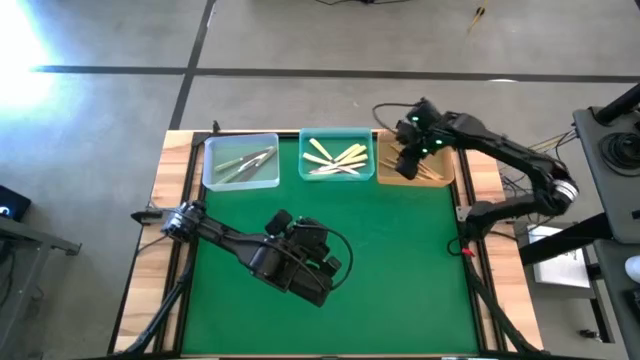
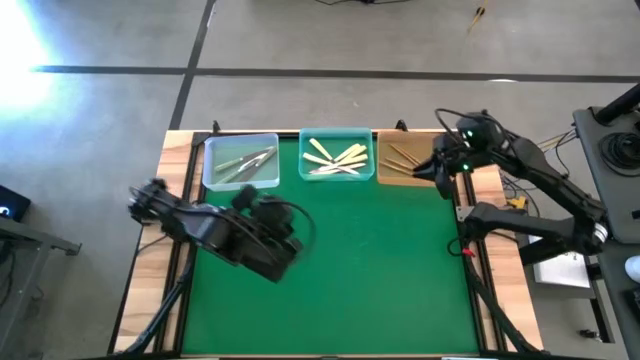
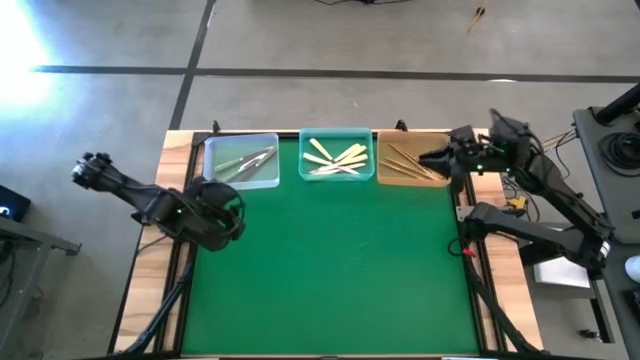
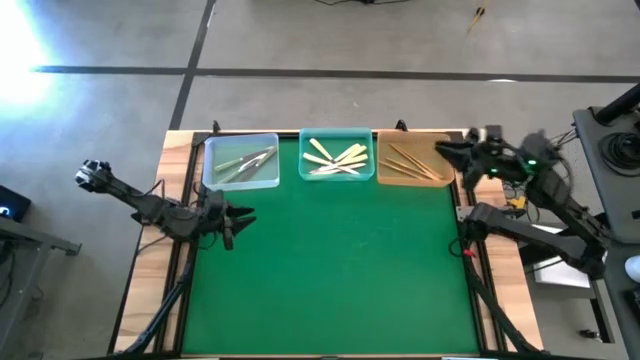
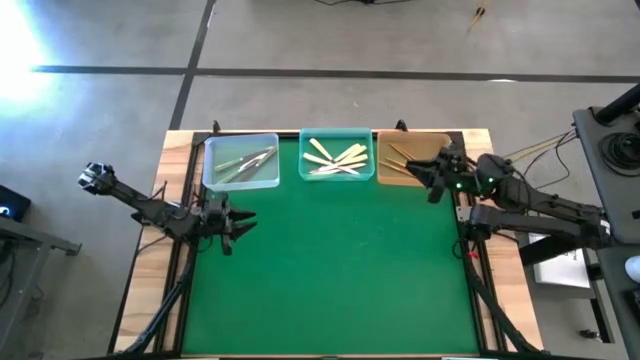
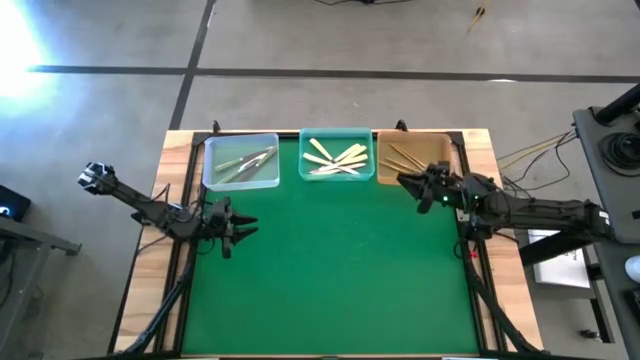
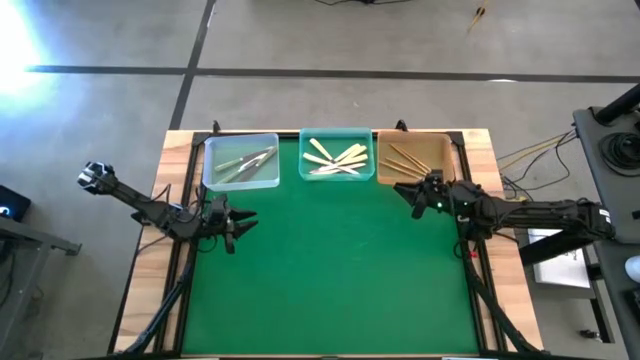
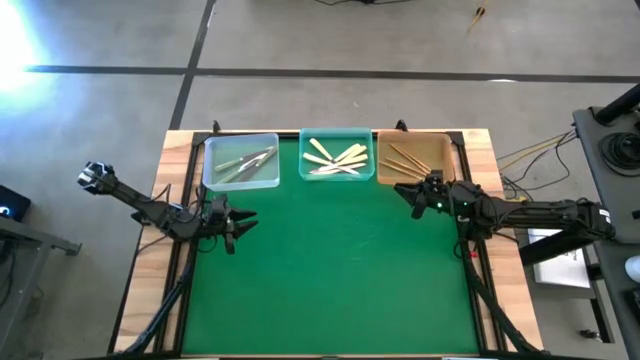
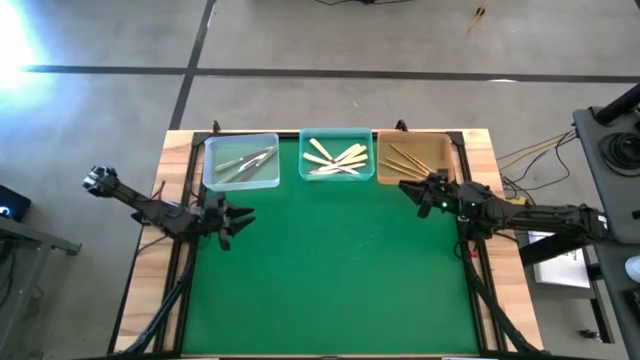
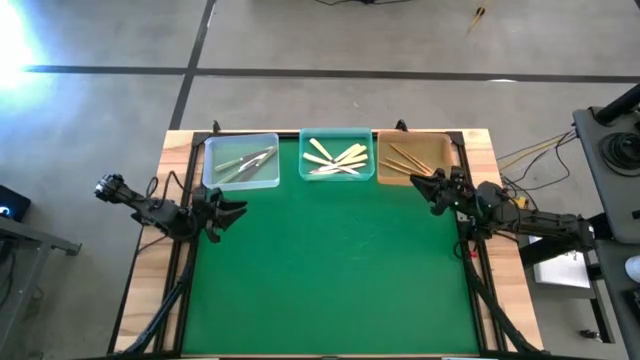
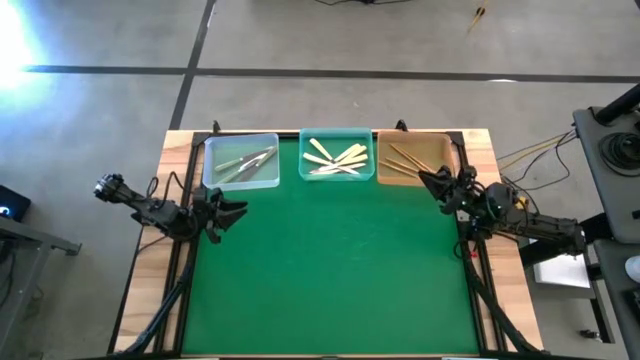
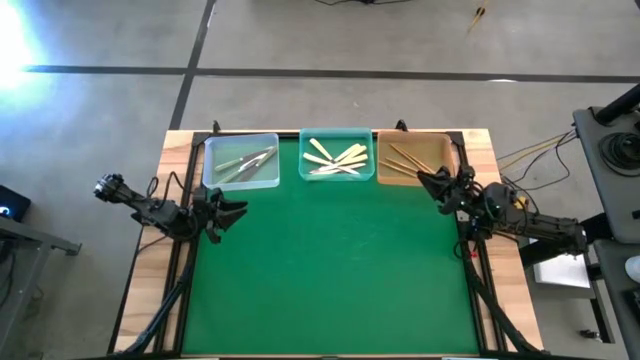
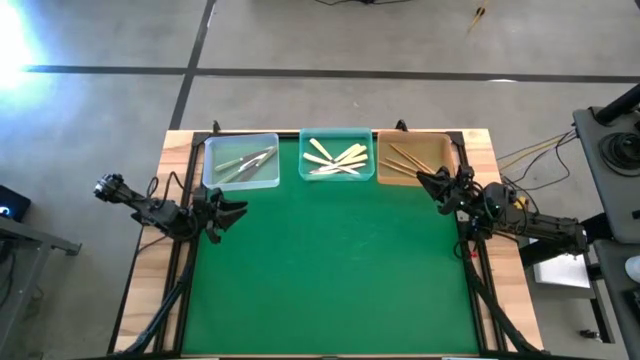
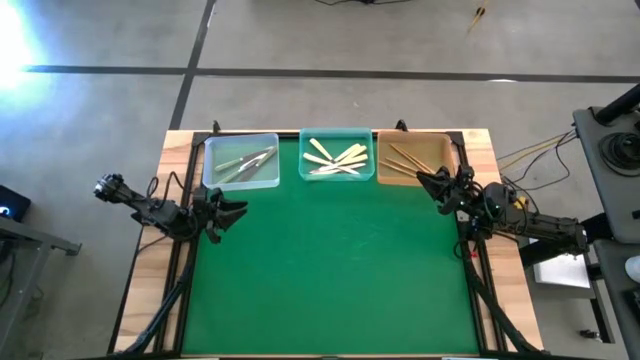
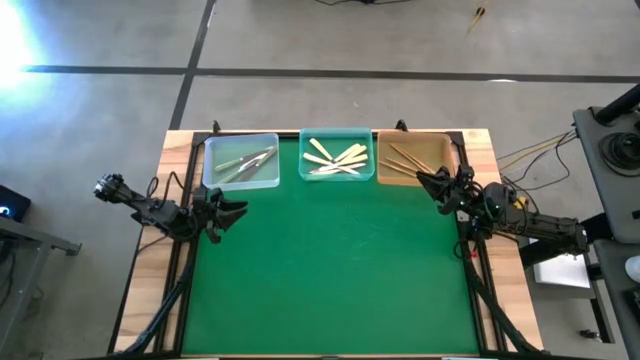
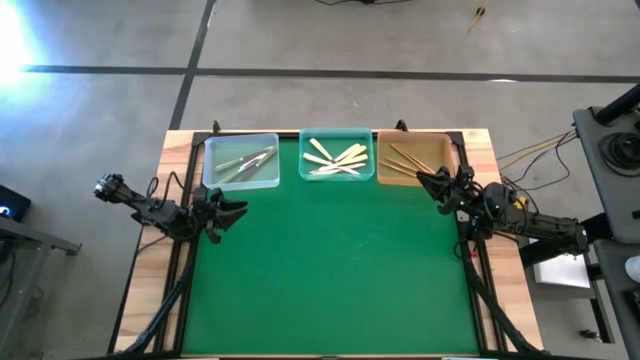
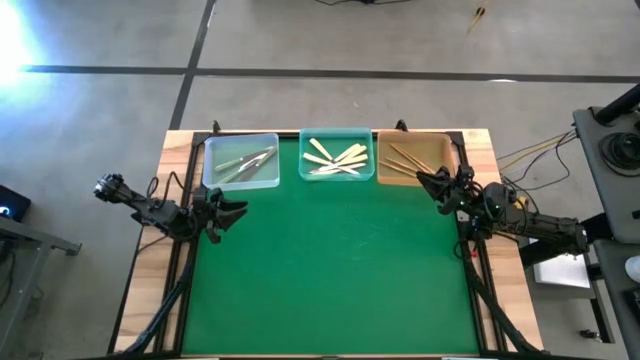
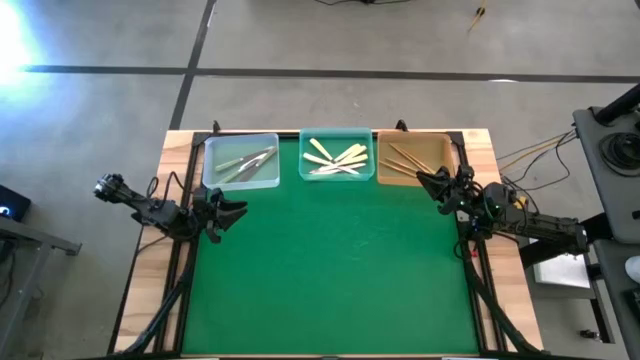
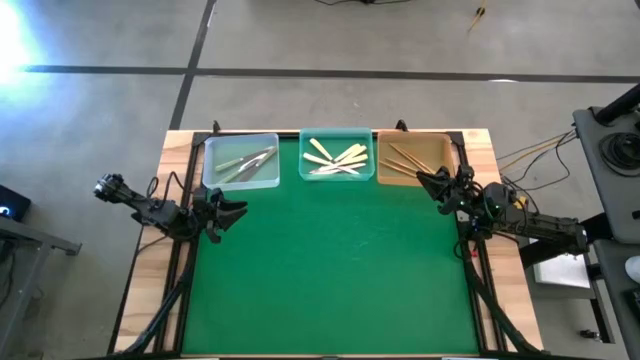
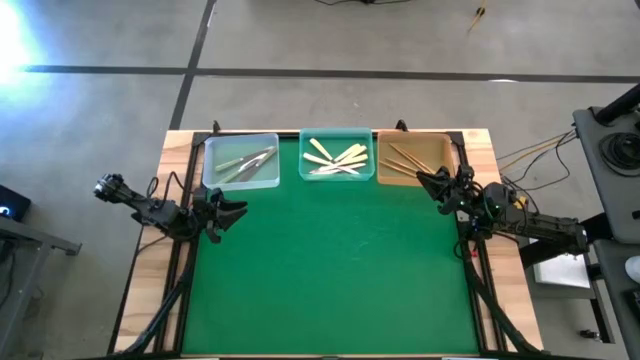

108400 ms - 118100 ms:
Task: Sort silverware by color (type)
Return to Home Position

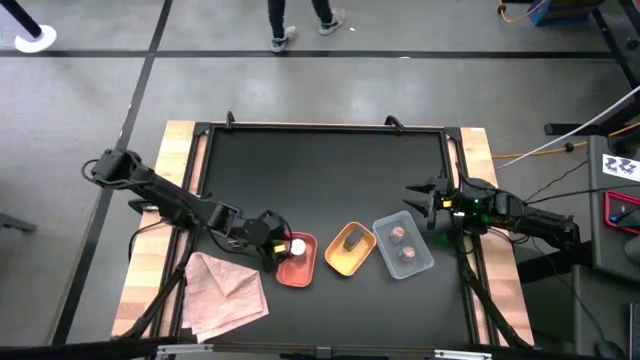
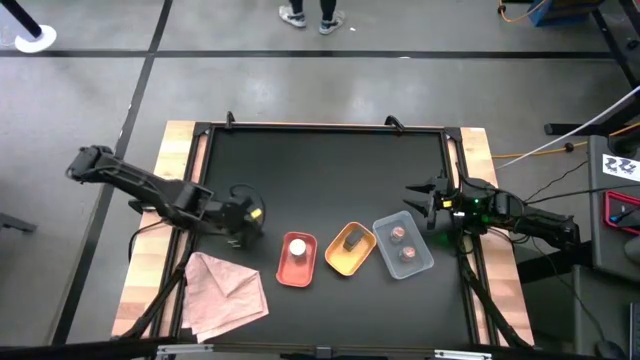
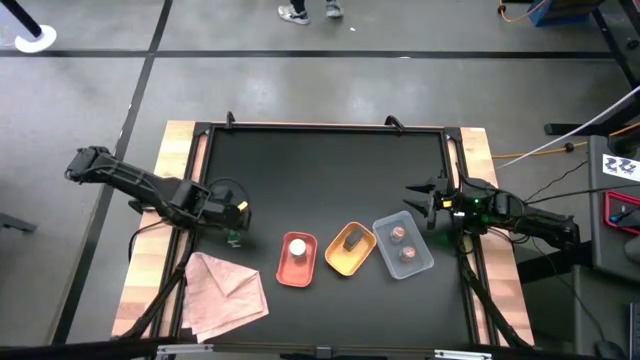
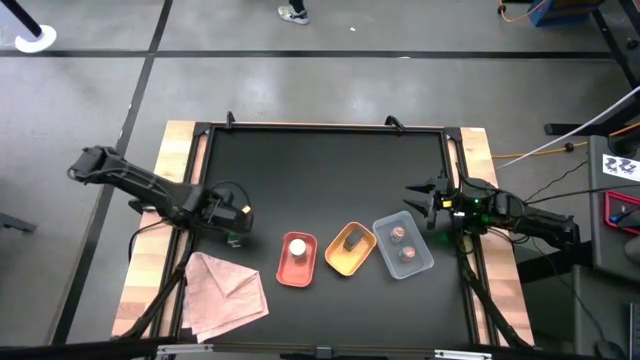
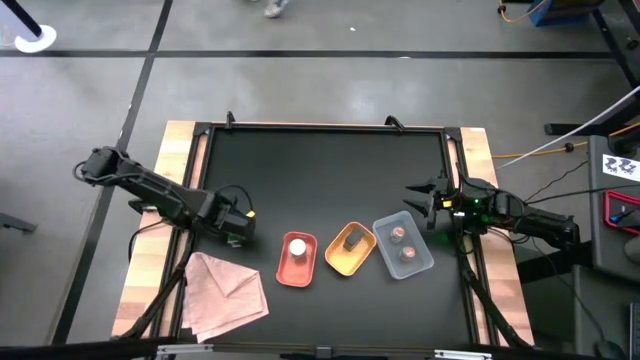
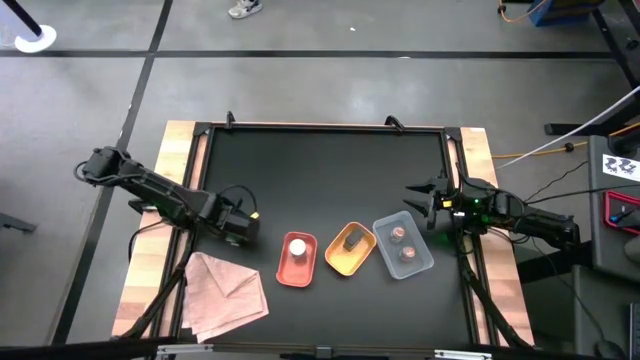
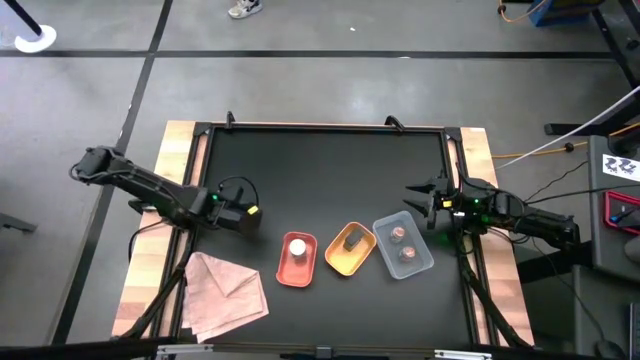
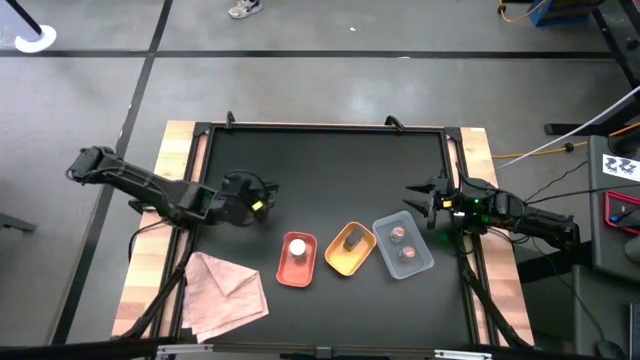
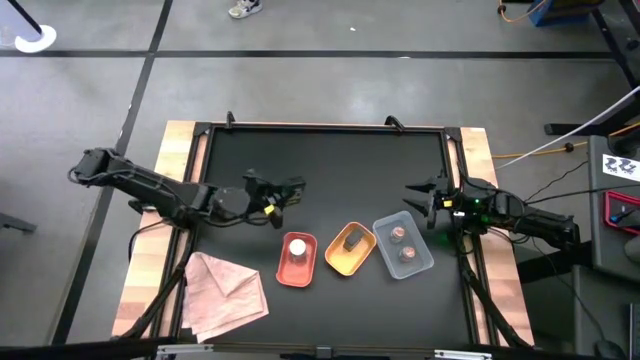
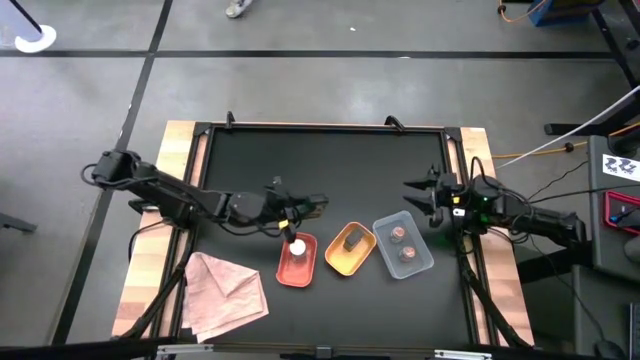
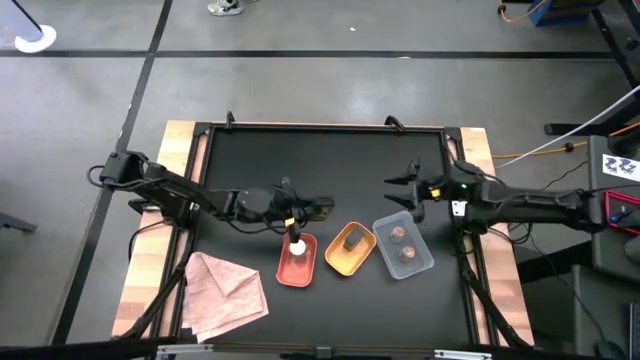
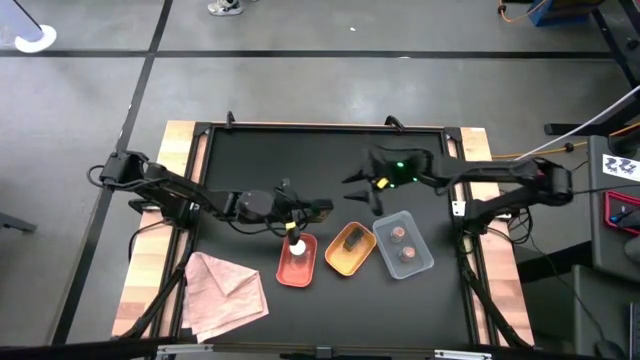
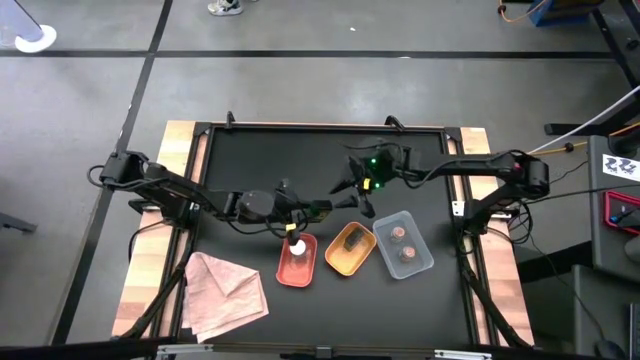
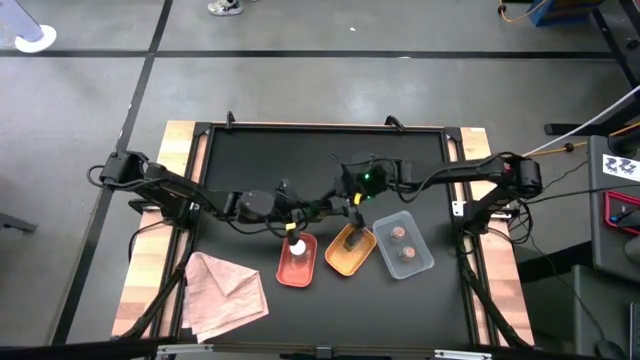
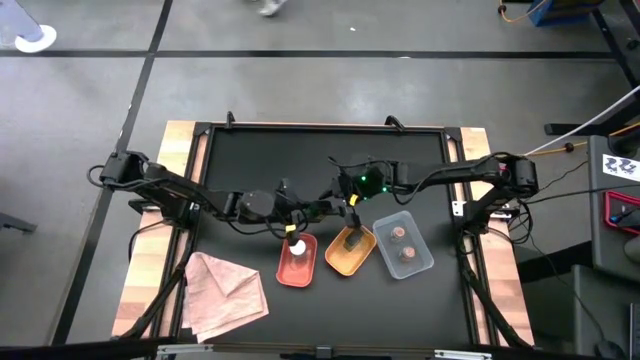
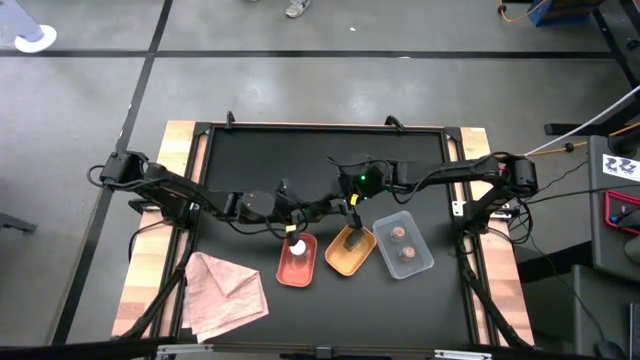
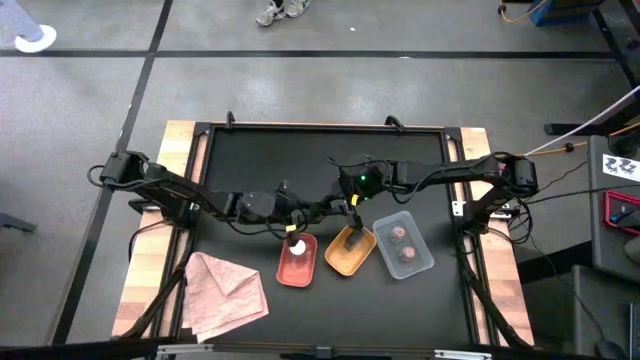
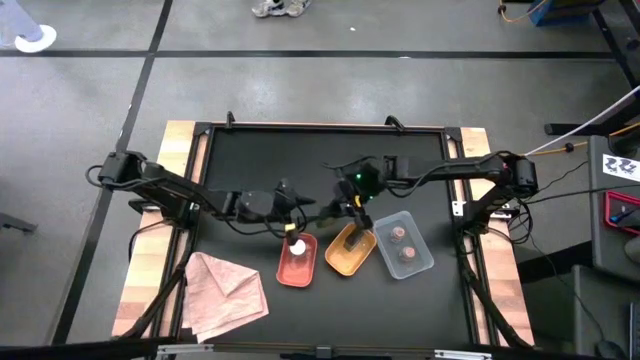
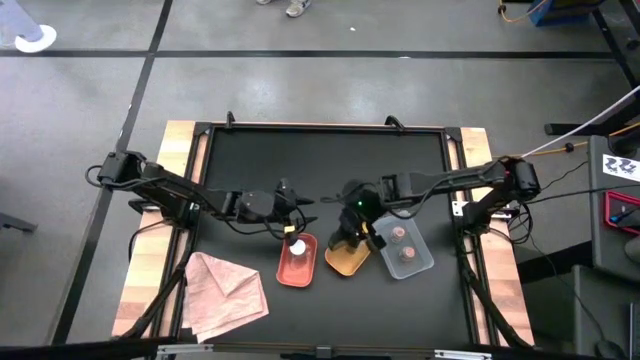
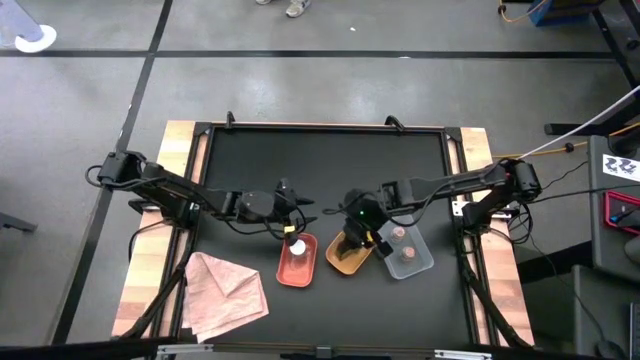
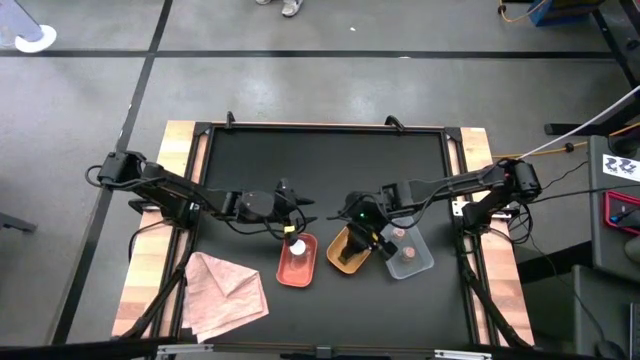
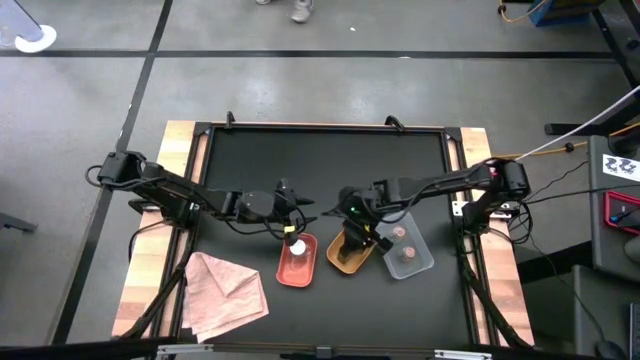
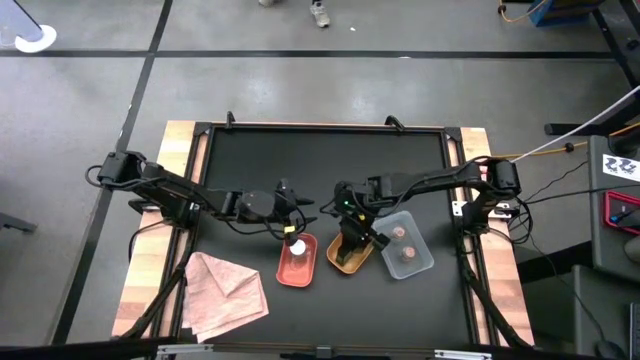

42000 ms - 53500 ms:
Task: Sort spices by type
Put the black spice can into the yellow bin
